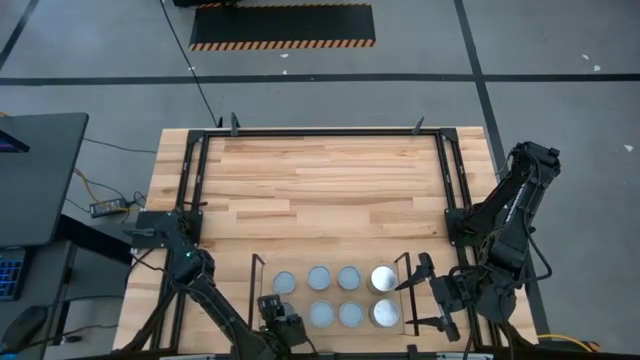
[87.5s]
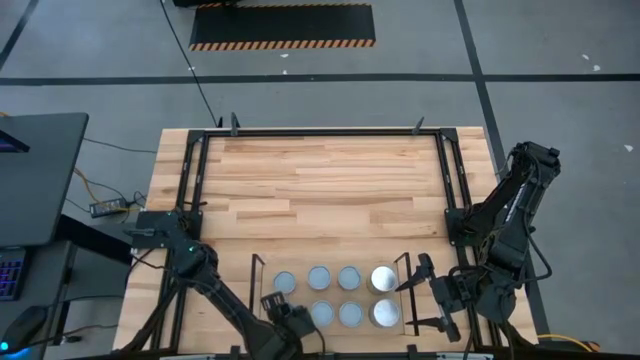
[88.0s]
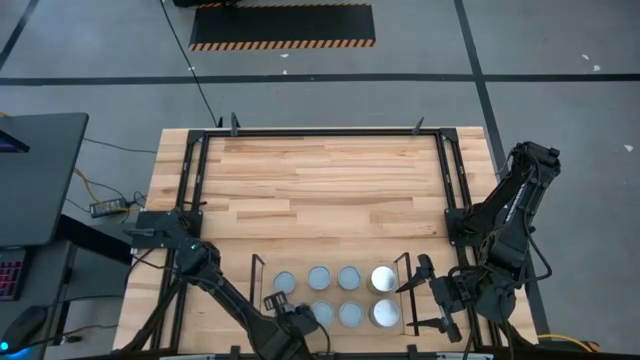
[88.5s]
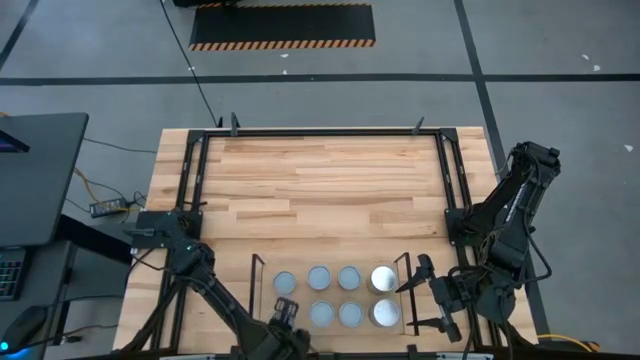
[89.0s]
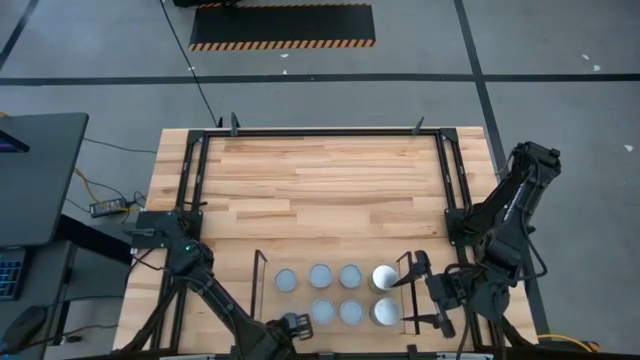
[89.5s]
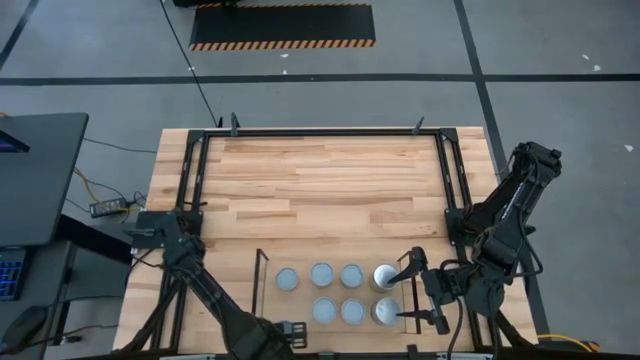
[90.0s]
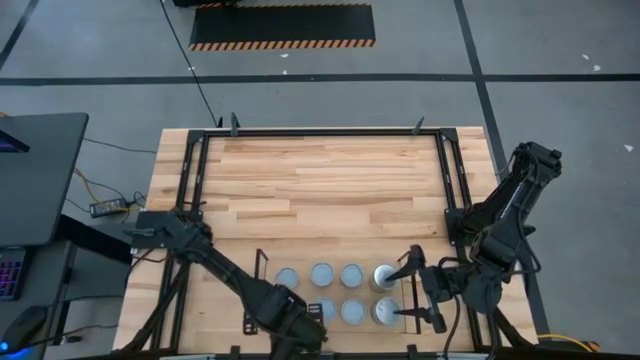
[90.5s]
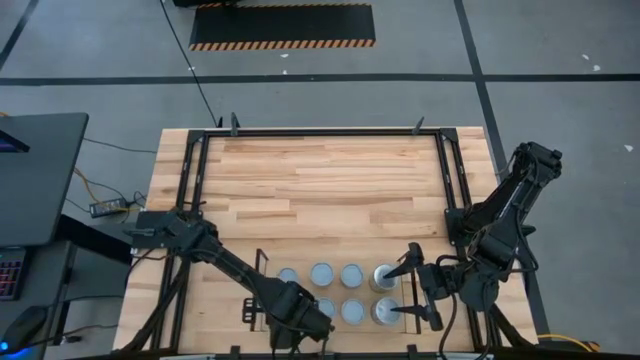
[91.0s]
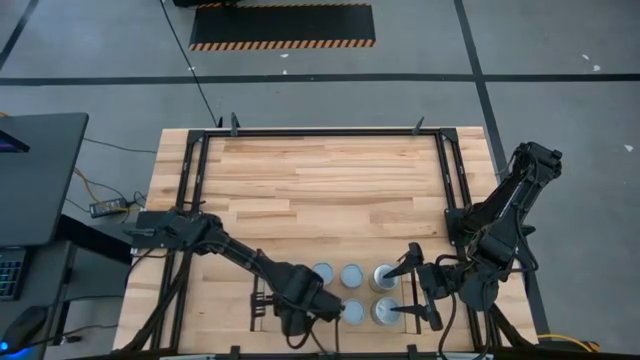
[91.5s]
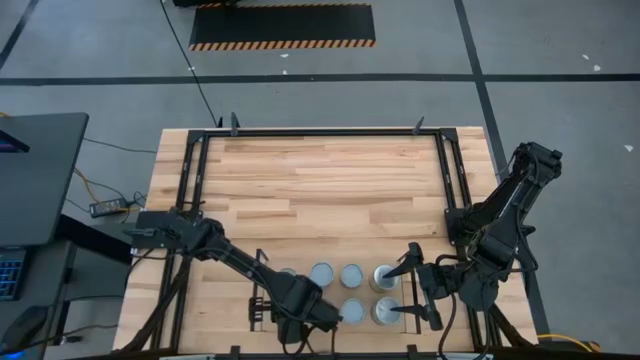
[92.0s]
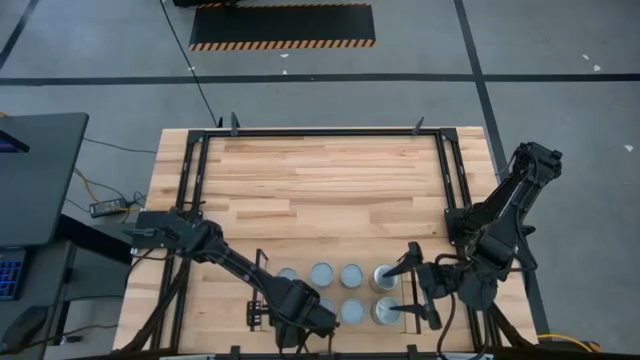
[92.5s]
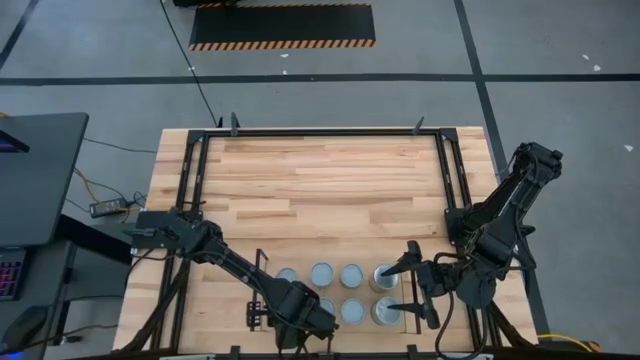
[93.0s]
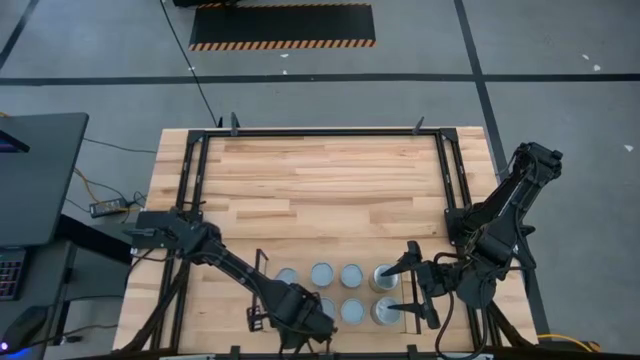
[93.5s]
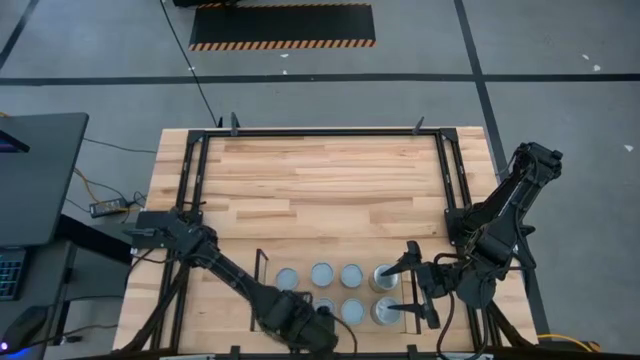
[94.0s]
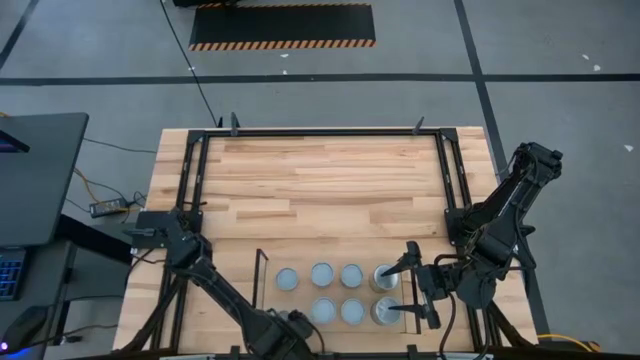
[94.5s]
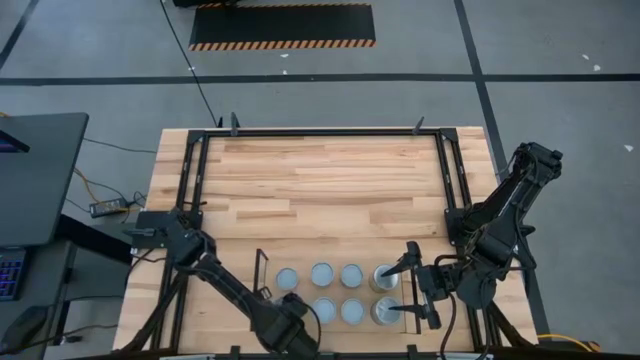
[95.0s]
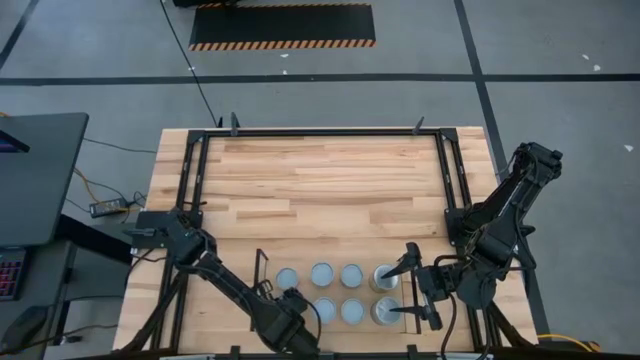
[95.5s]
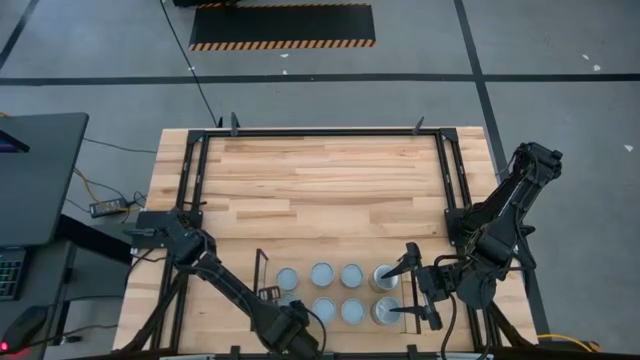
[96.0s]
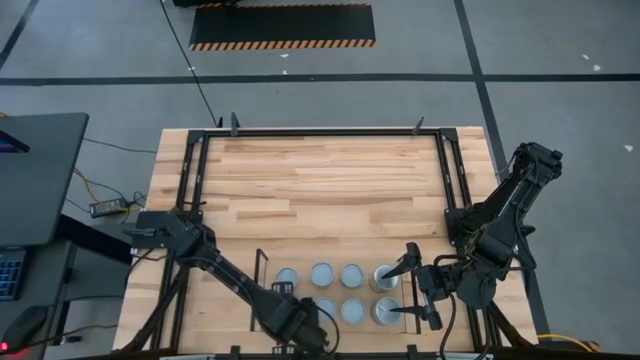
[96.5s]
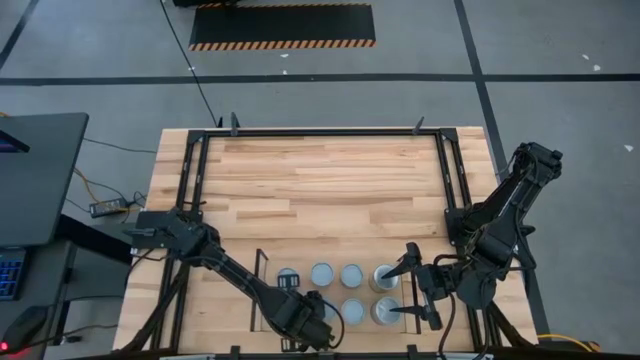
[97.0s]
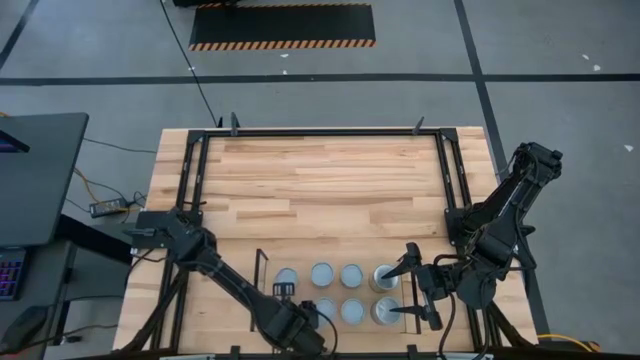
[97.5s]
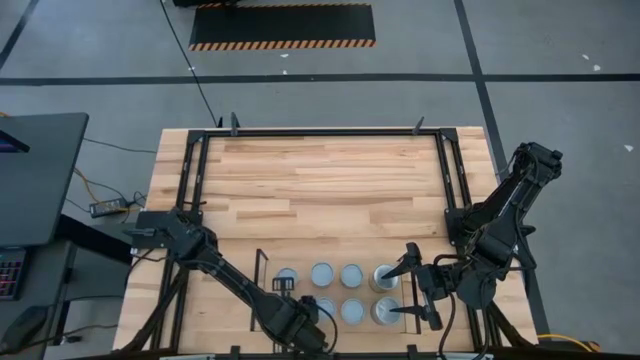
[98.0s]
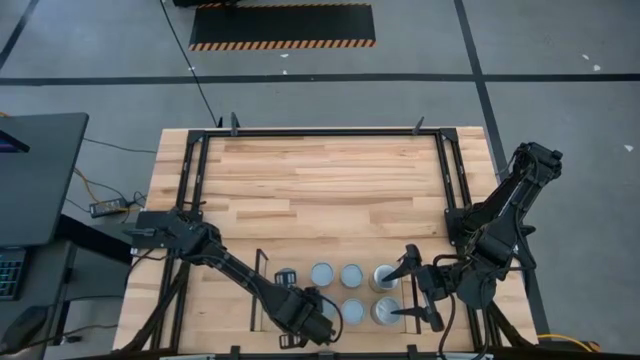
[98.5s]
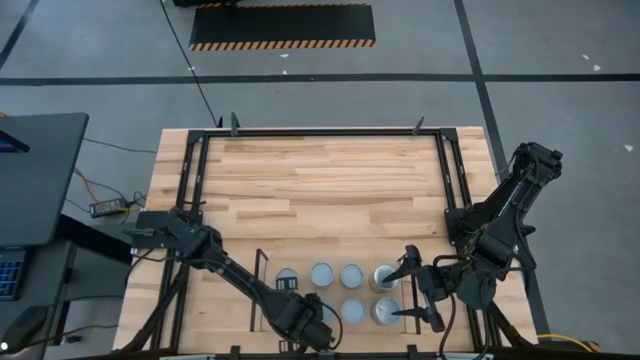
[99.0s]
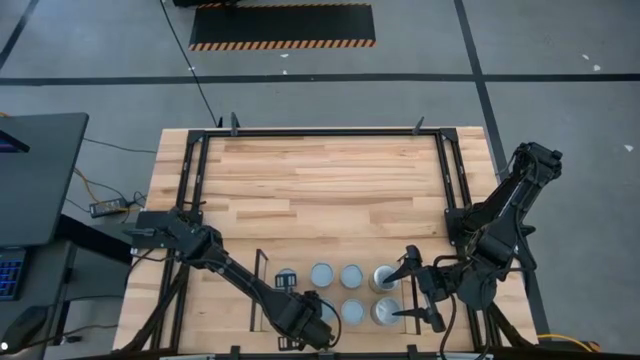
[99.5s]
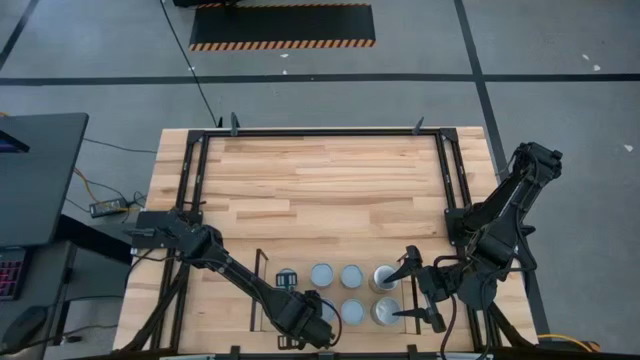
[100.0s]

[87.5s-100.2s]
Task: Pick and place cans onto a shelf
Put the canned salmon on the shelf

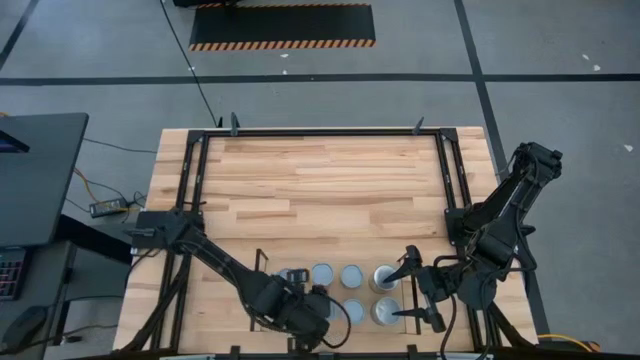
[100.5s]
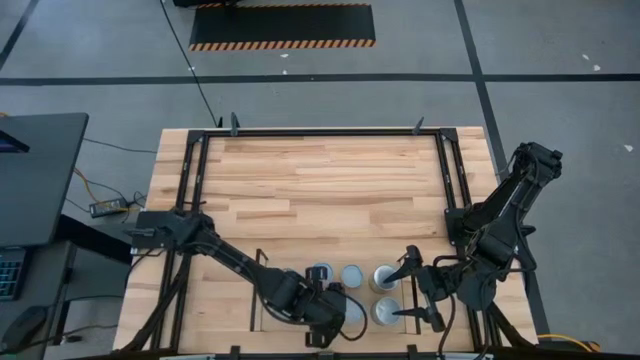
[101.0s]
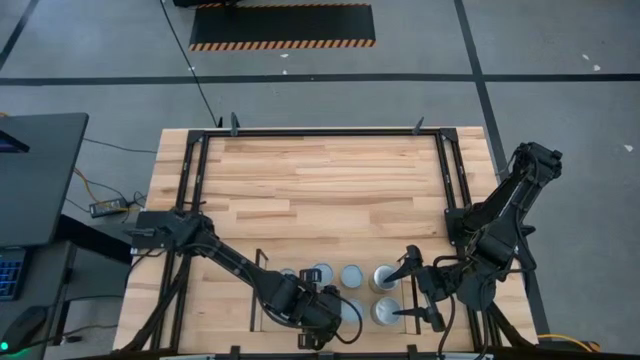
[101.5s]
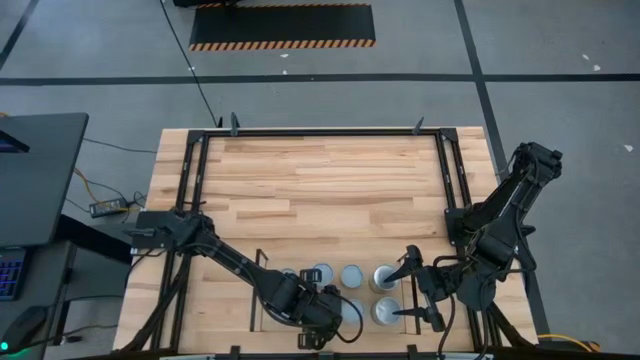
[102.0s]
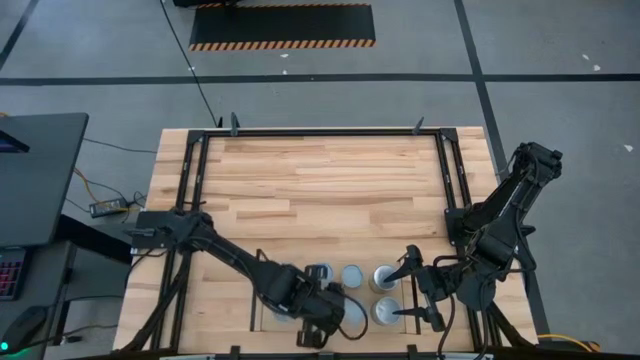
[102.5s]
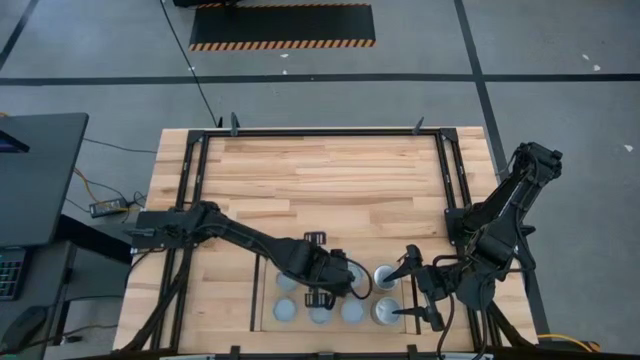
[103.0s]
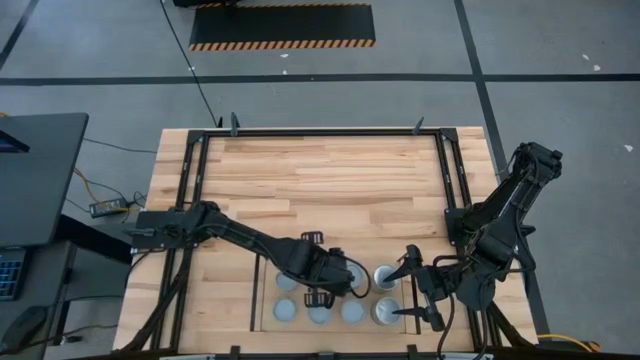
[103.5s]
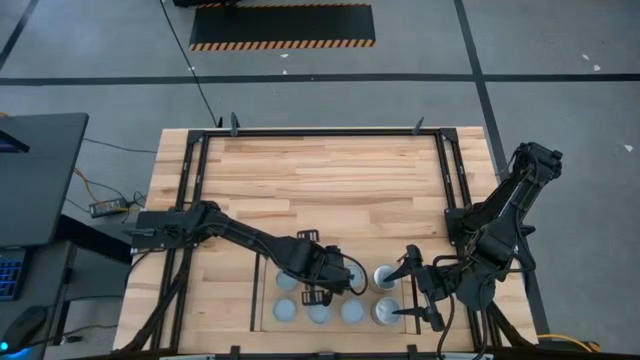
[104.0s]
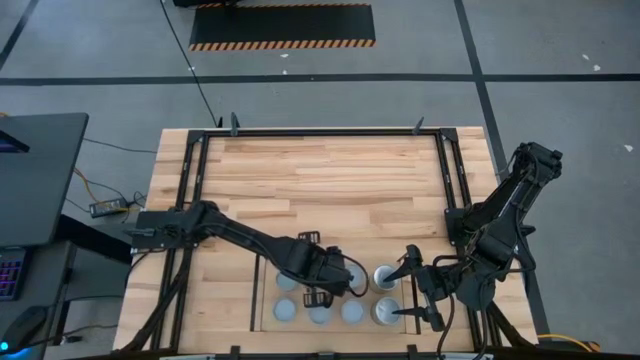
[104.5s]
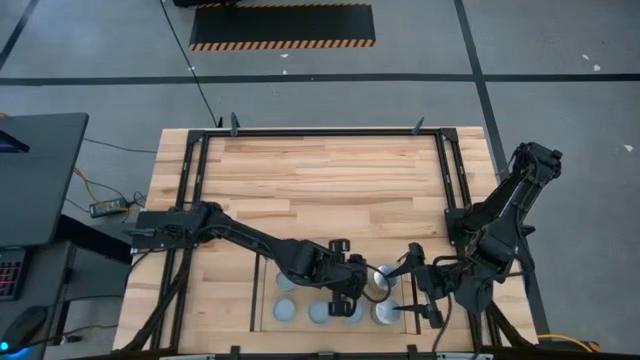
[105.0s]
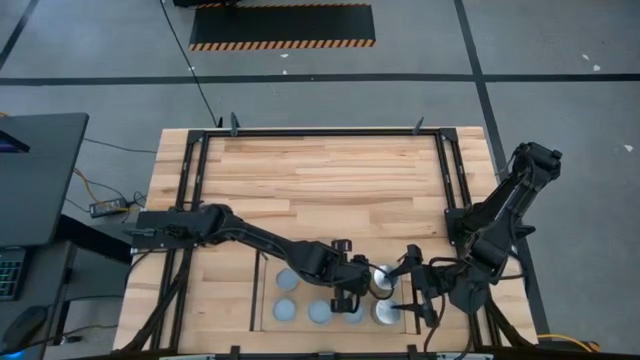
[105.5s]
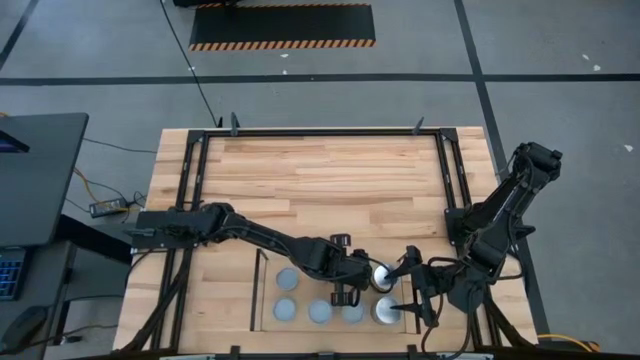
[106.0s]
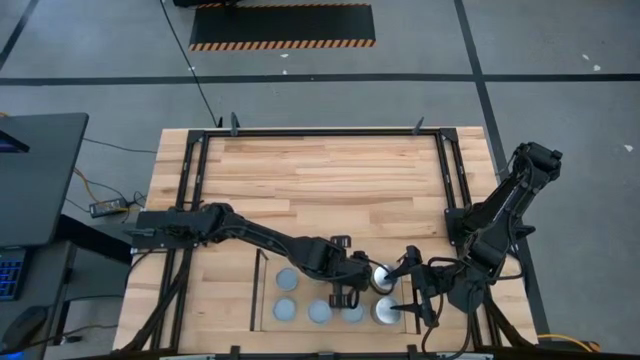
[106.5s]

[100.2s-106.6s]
Adjust the cans on the shelf

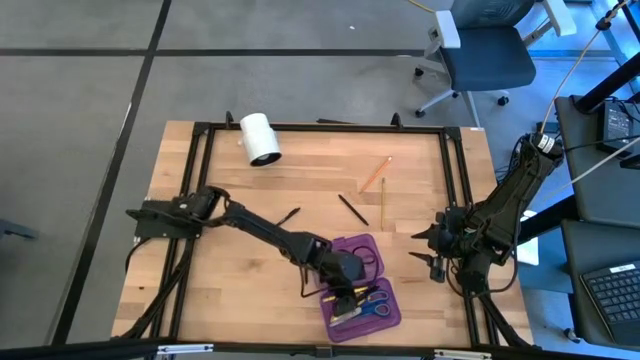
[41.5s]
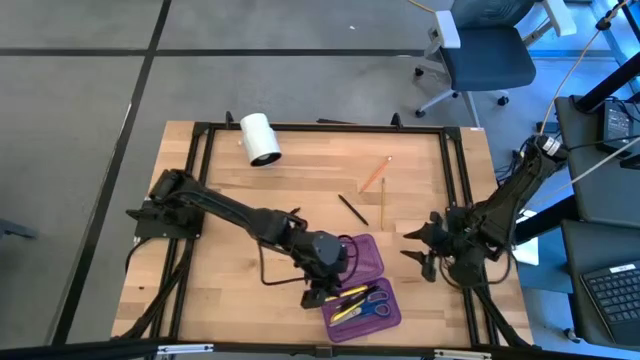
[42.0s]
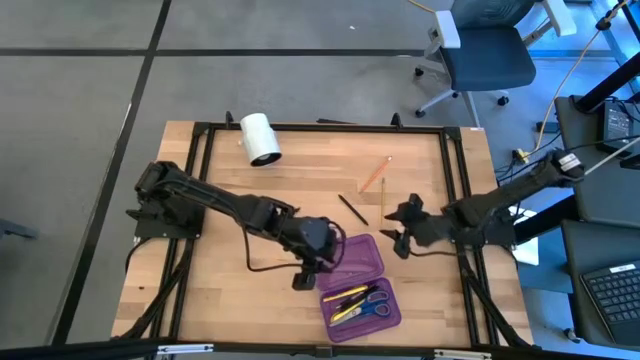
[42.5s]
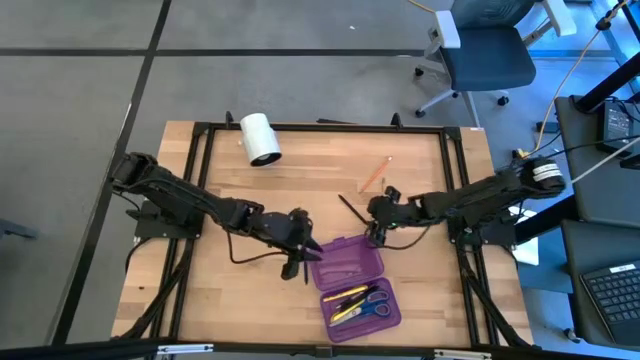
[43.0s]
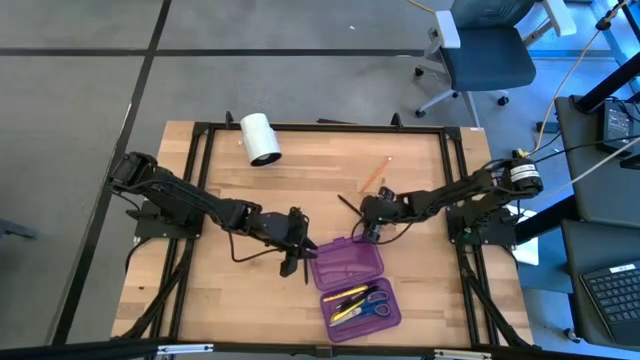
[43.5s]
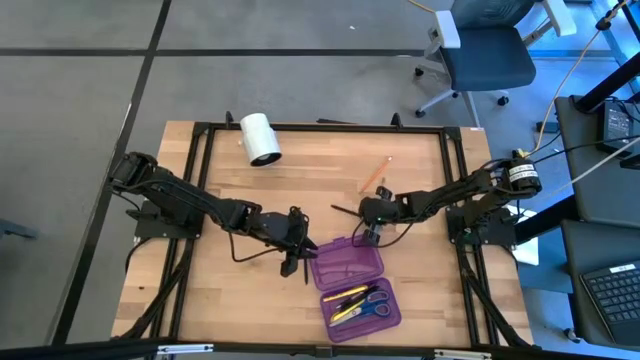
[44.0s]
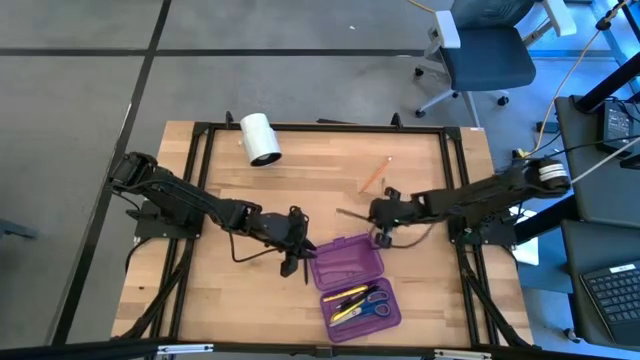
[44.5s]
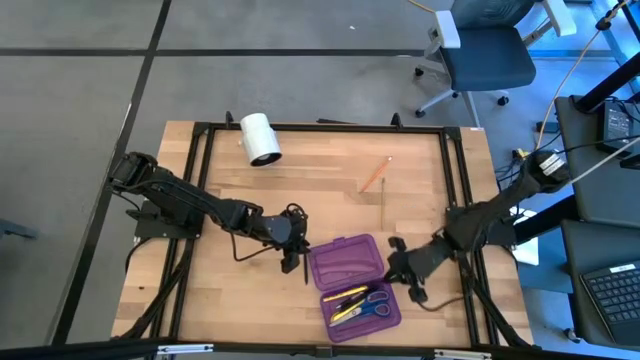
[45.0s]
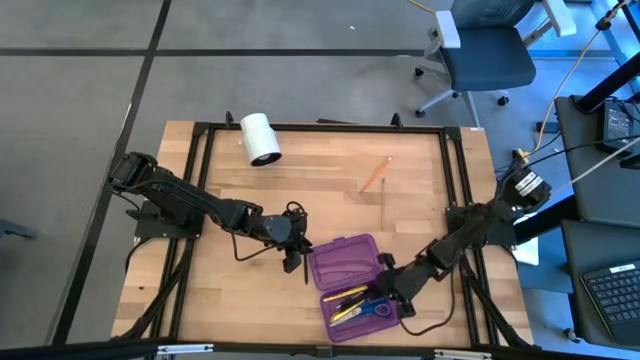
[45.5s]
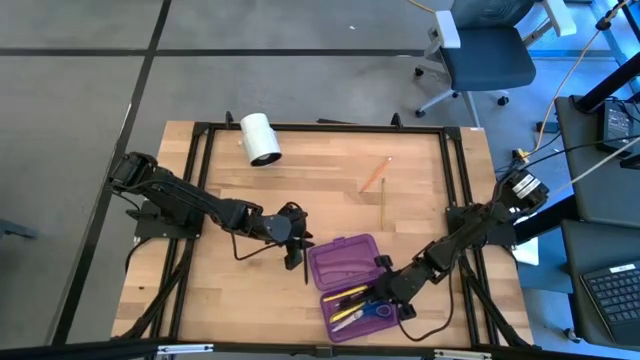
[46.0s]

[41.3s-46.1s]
Task: Pick & place school supplies into a supply box
Put the top right black pen into the purple supply box
